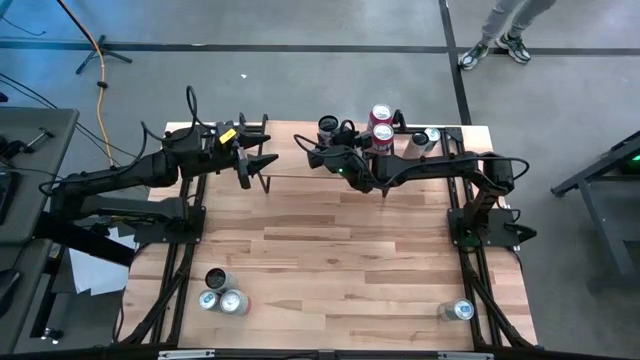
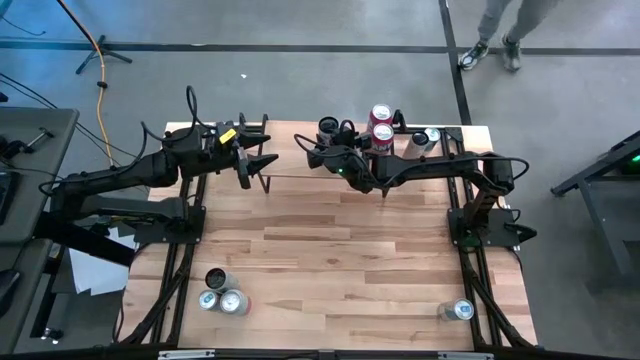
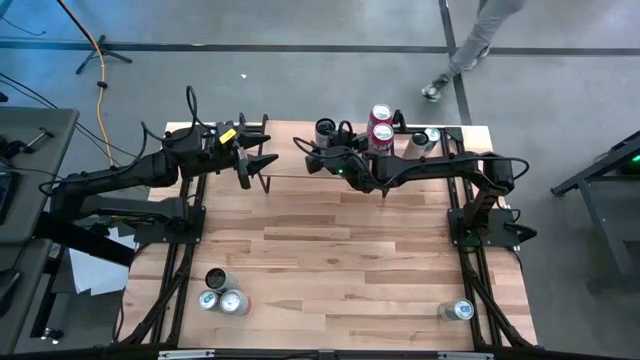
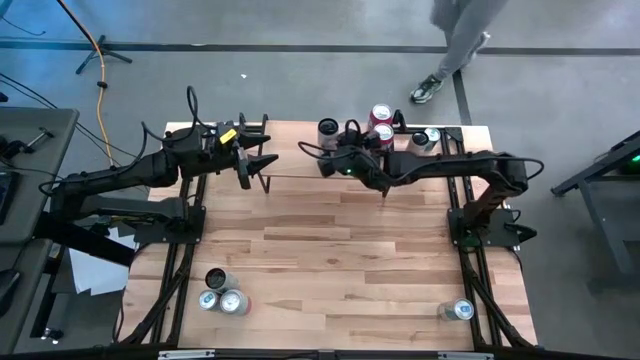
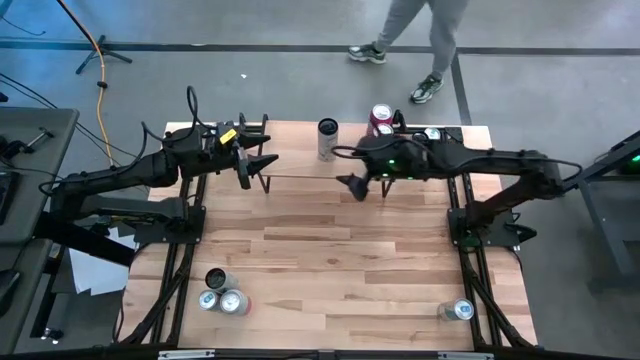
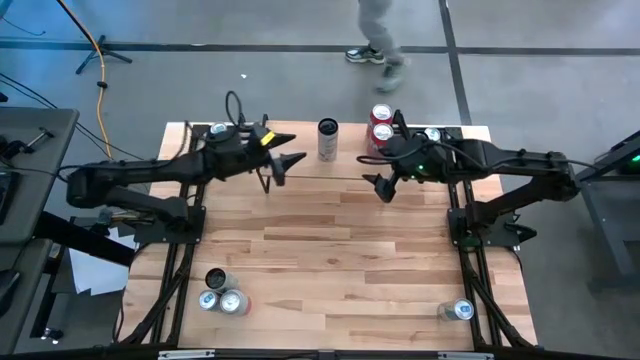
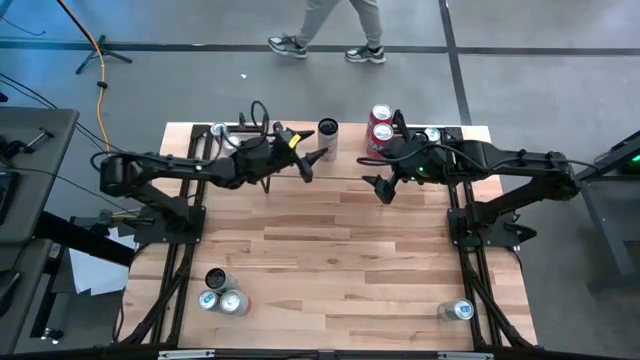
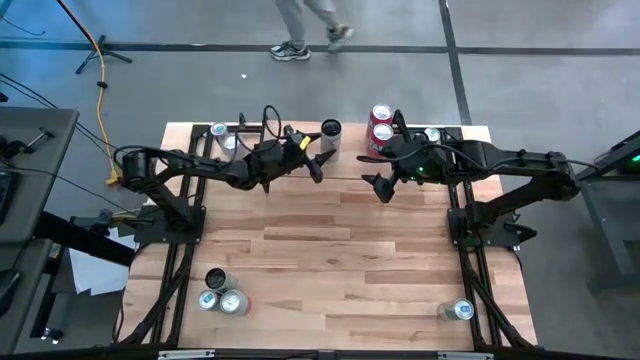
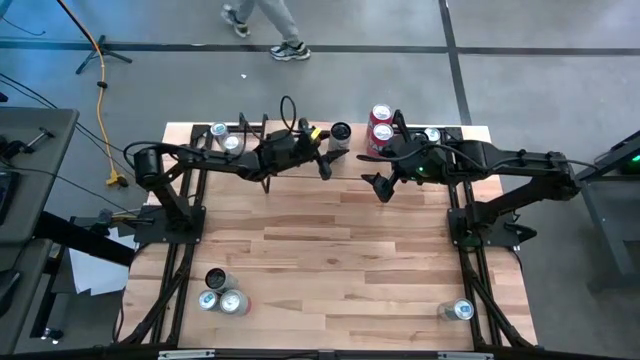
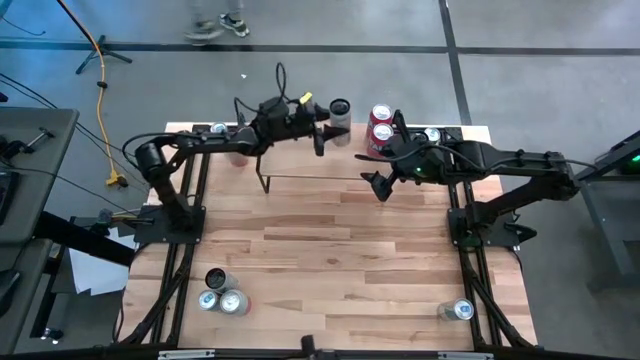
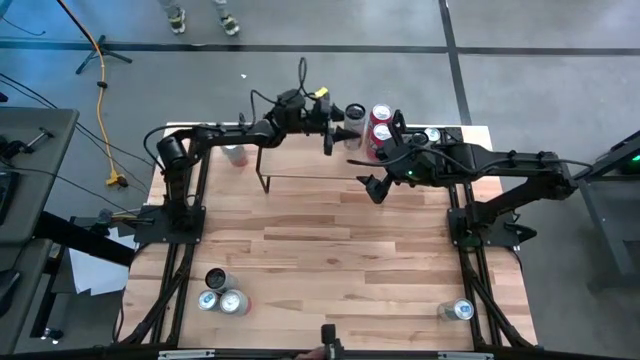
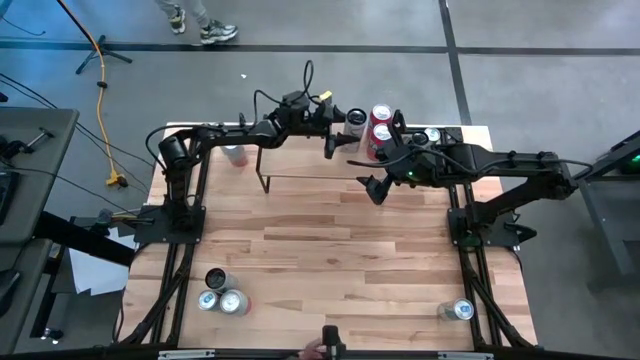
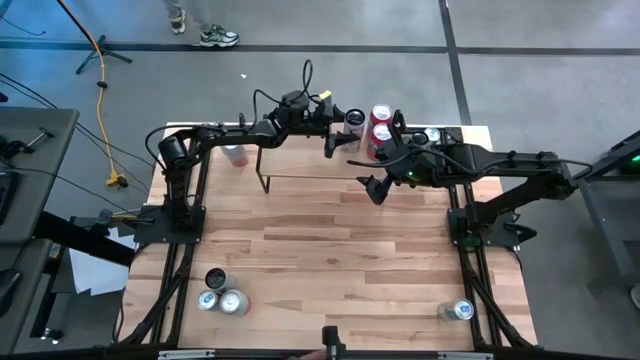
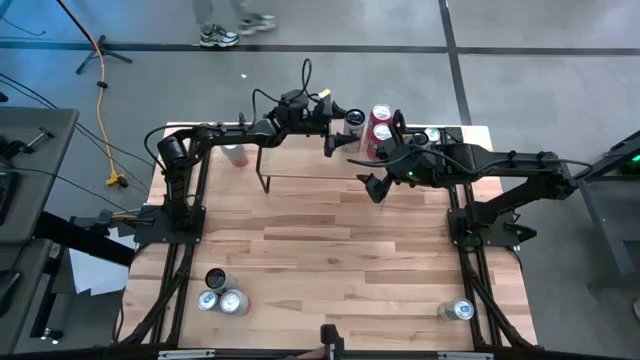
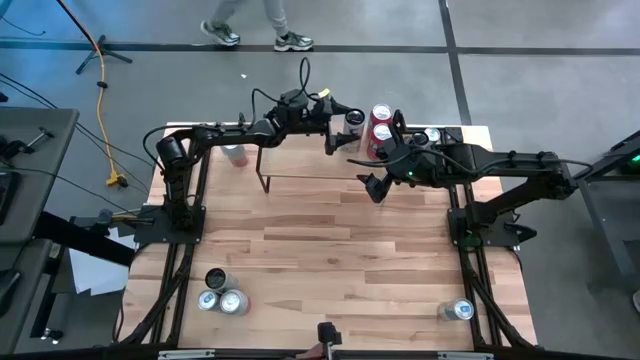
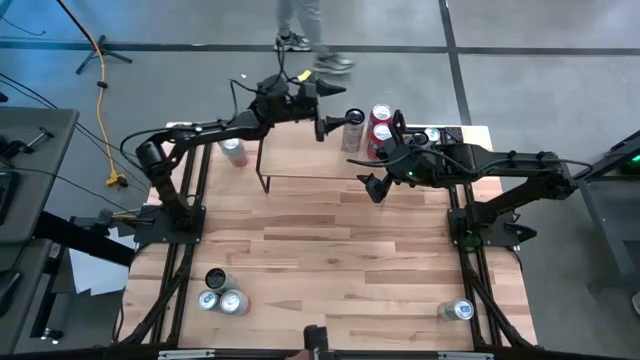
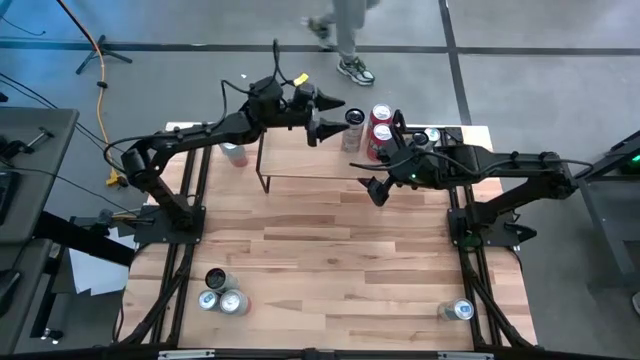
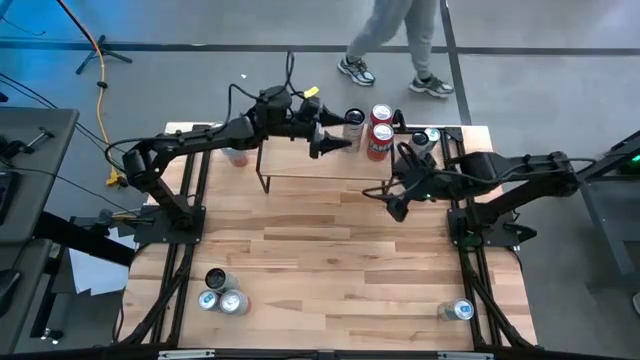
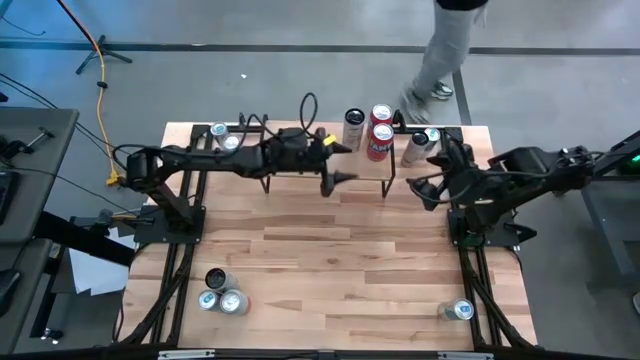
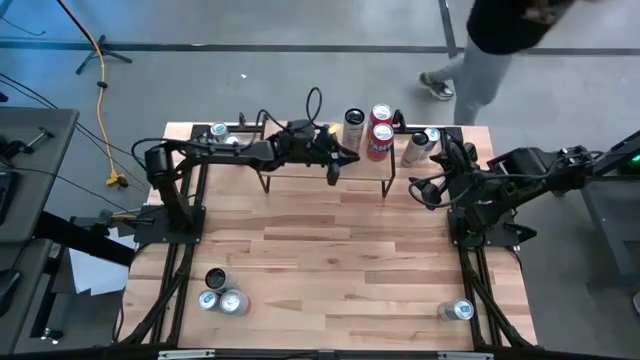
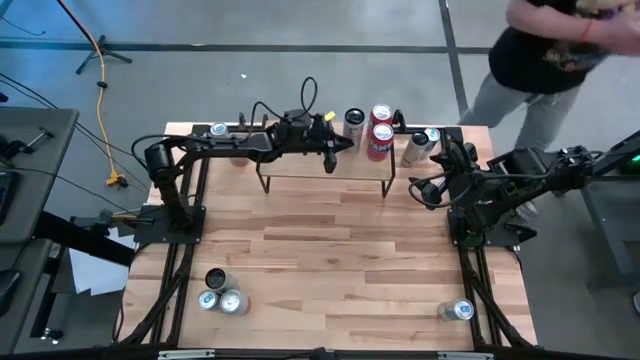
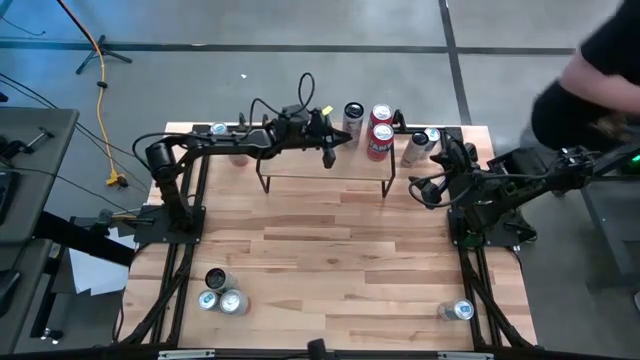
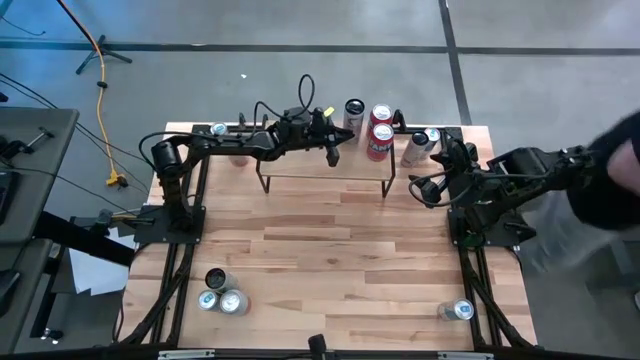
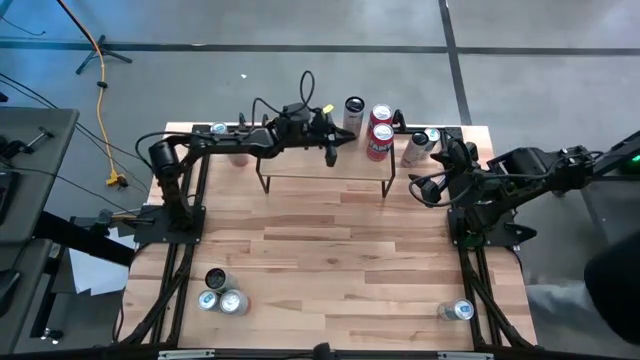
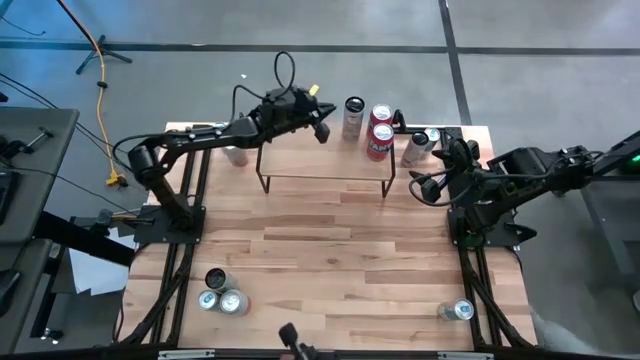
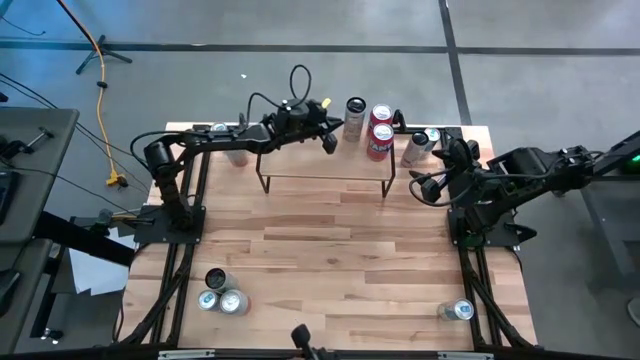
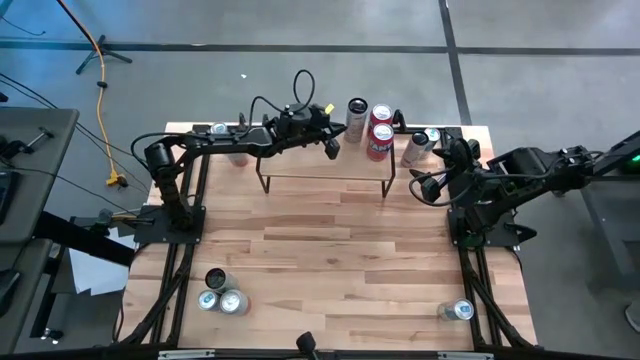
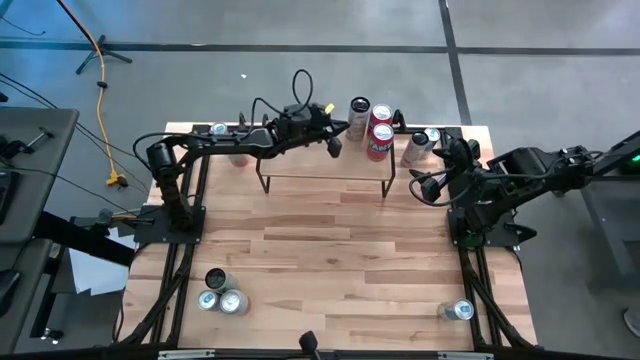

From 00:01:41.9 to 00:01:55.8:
Task: Place canned beverage on shelf
Put the bottom right white-pink soda can on the shelf

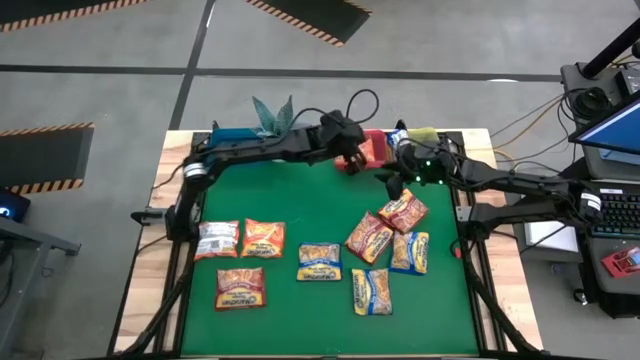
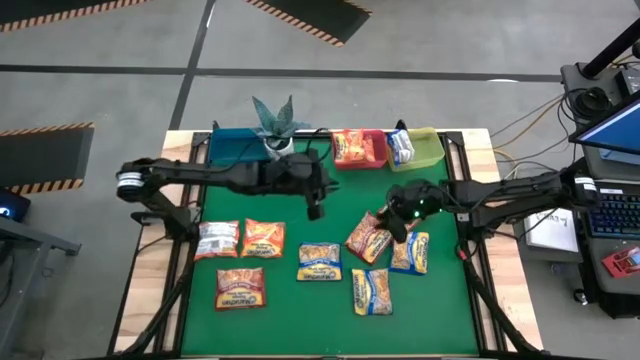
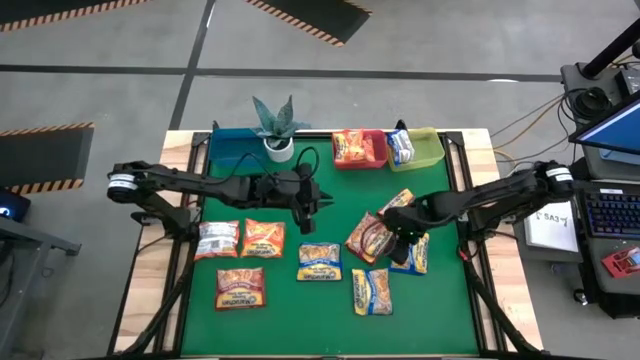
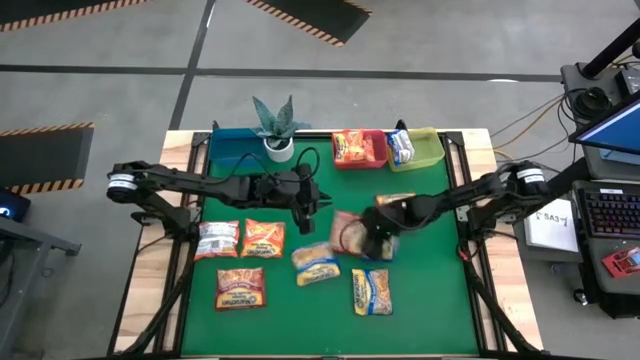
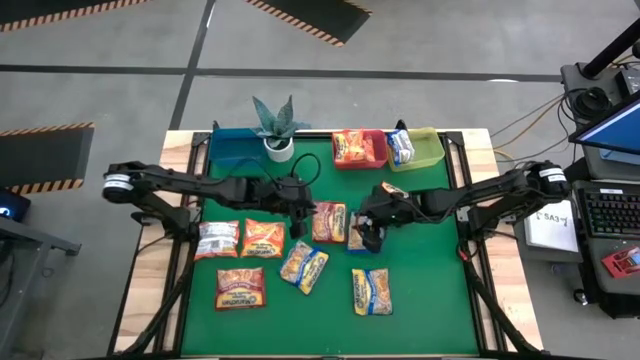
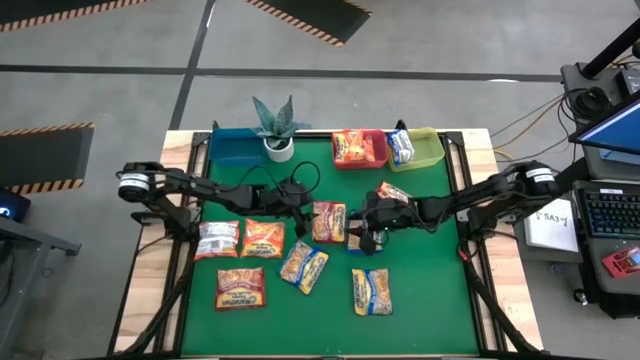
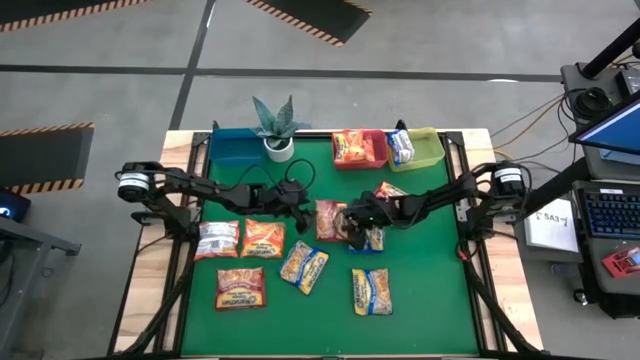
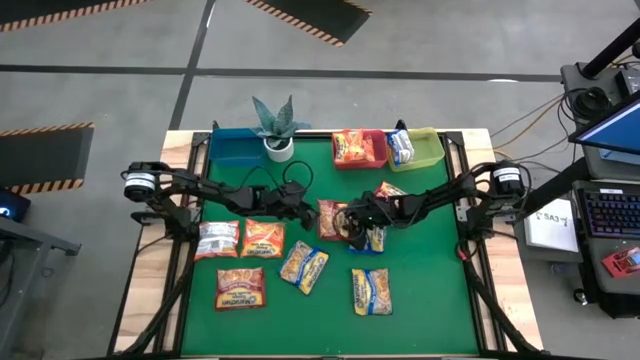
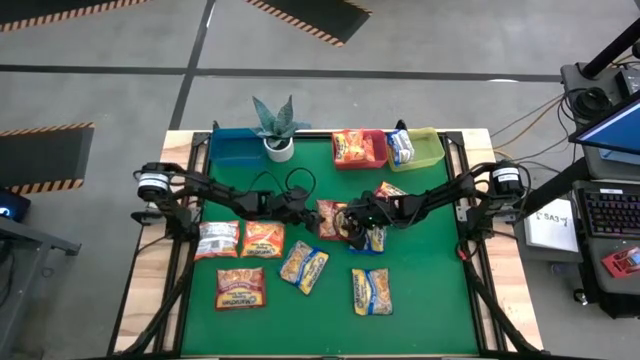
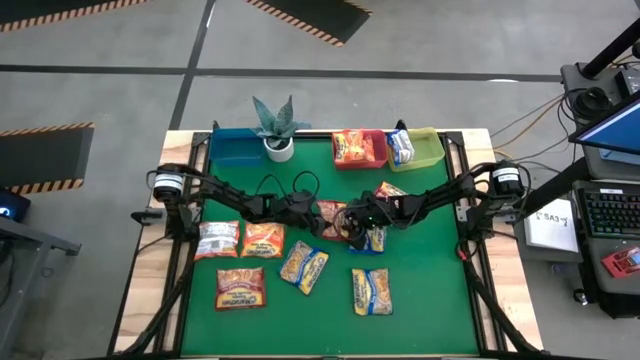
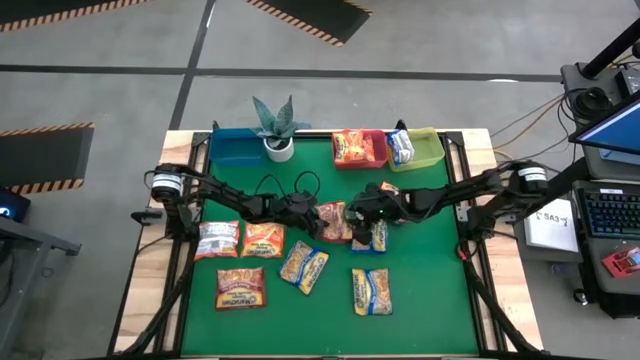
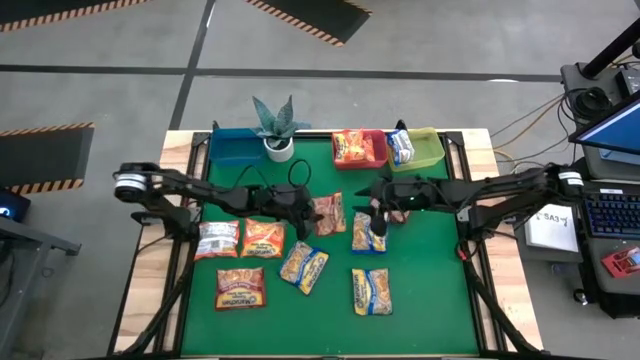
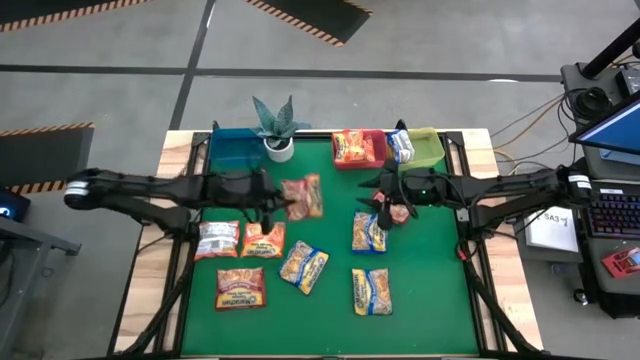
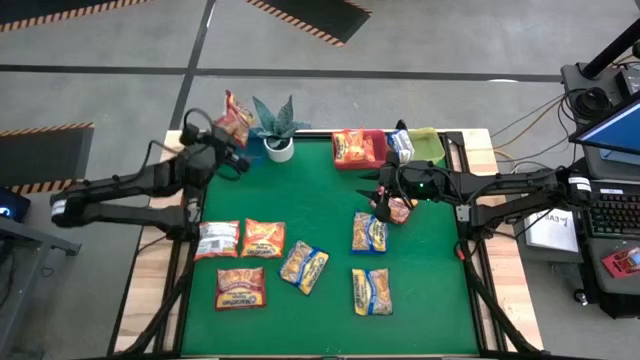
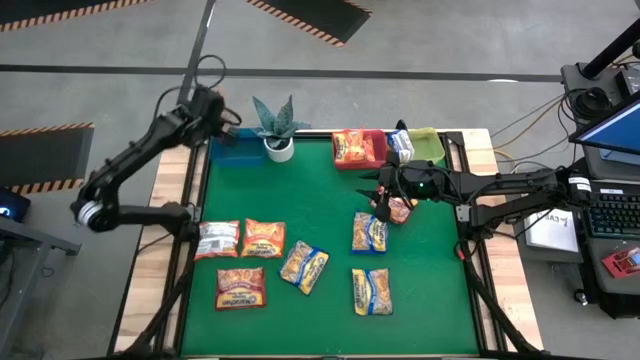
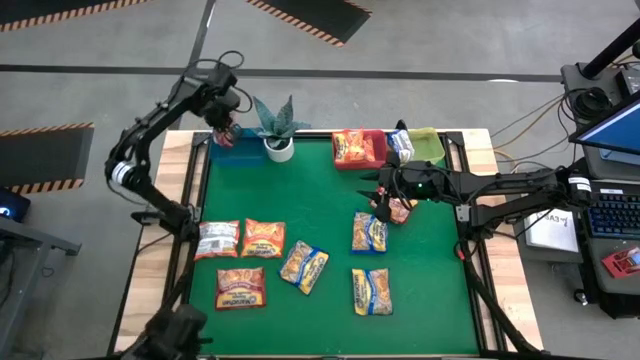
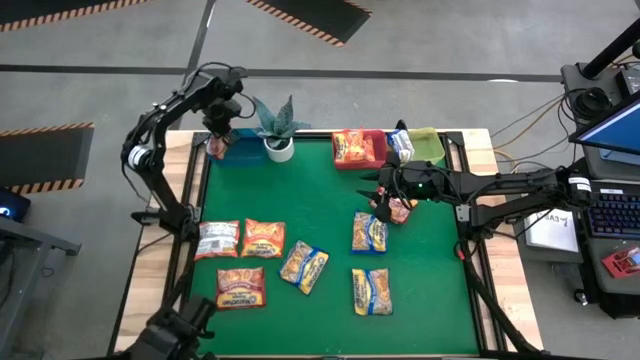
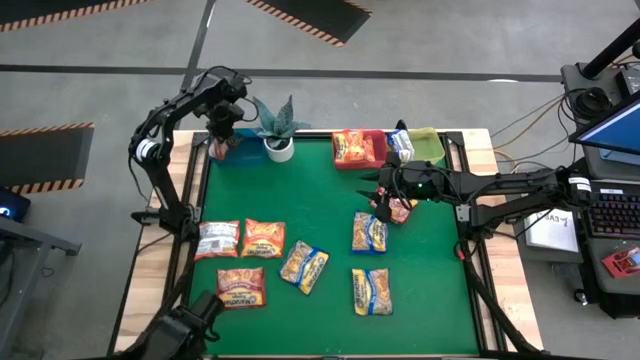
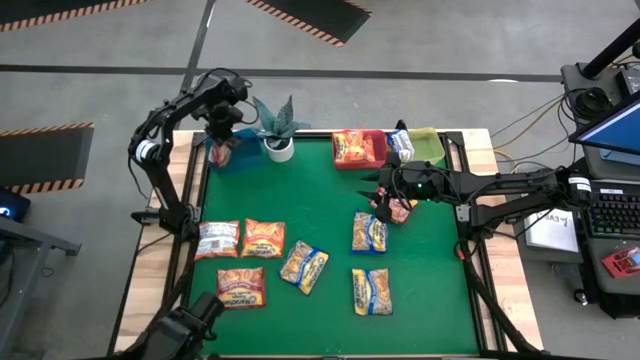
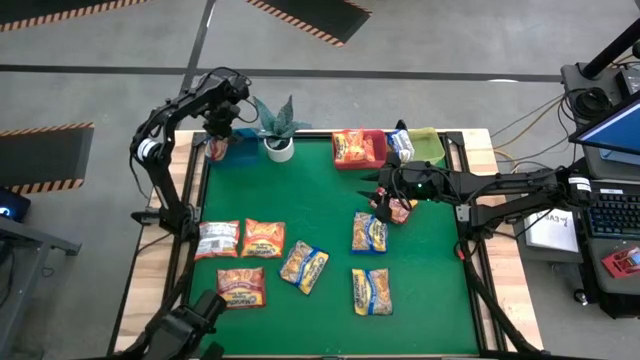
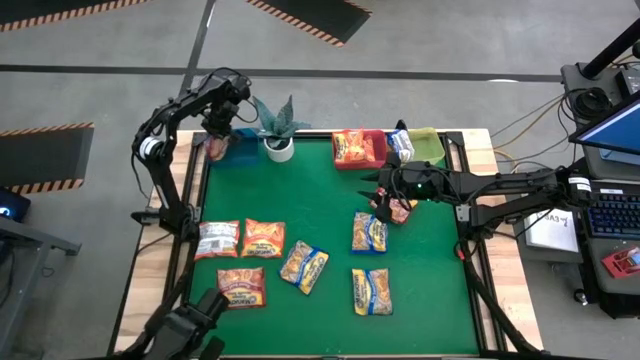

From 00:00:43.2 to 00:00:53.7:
Task: Sort Maruchan noodles
Put the red noodle pack into the blue bin
